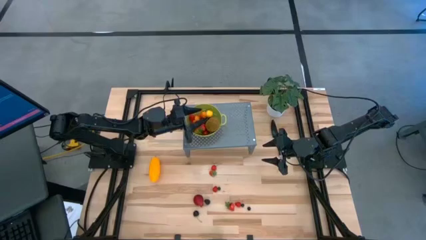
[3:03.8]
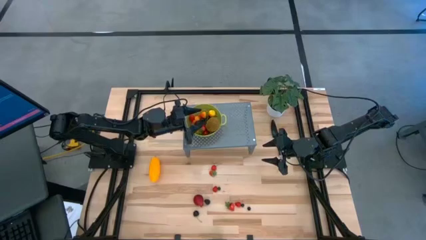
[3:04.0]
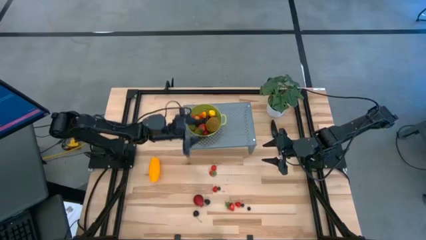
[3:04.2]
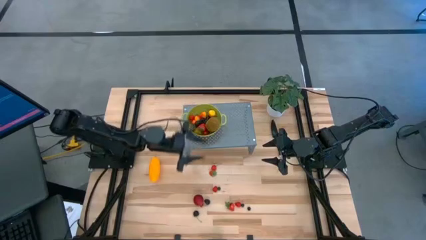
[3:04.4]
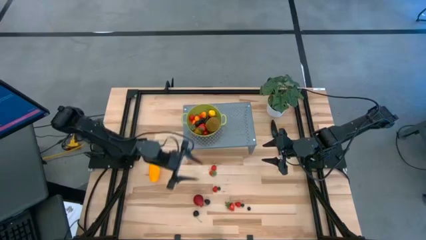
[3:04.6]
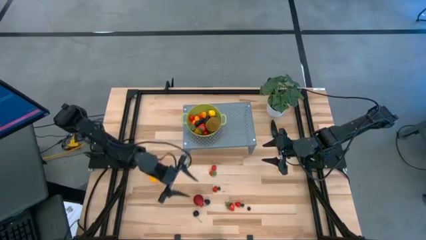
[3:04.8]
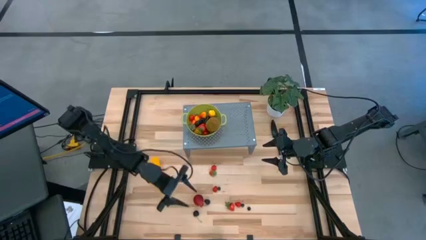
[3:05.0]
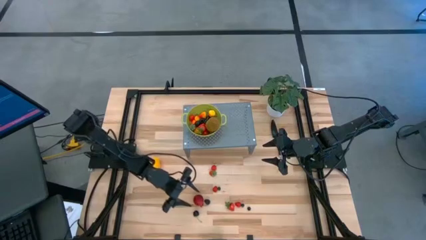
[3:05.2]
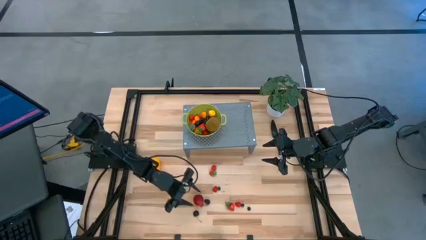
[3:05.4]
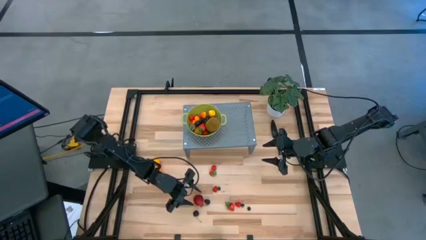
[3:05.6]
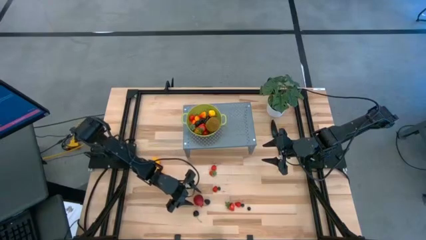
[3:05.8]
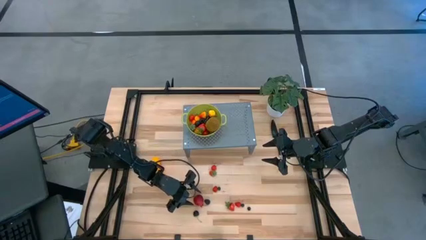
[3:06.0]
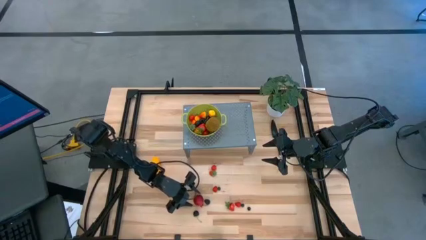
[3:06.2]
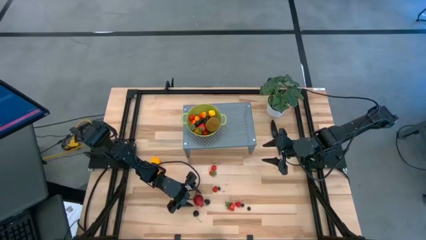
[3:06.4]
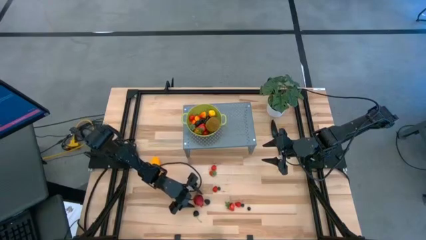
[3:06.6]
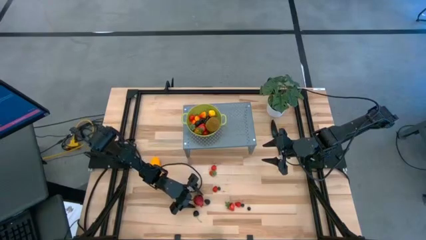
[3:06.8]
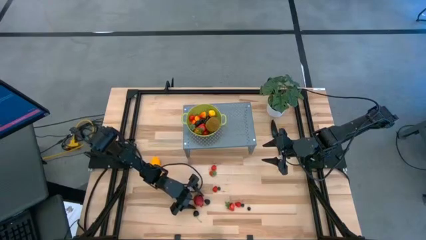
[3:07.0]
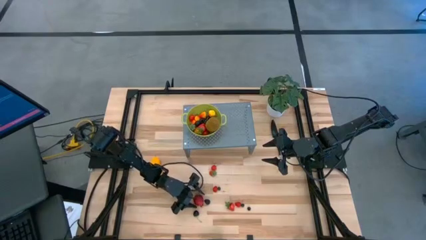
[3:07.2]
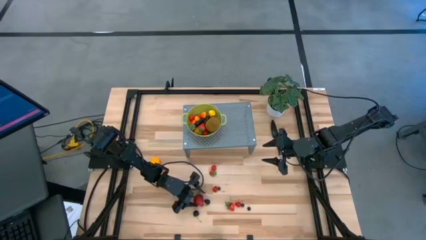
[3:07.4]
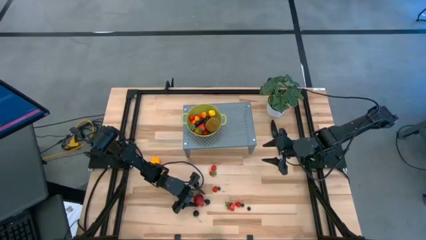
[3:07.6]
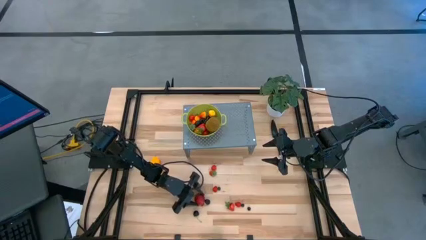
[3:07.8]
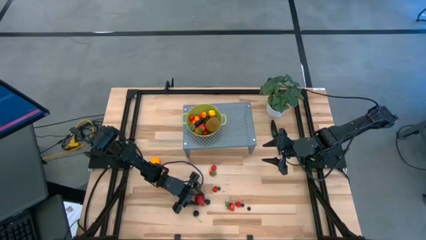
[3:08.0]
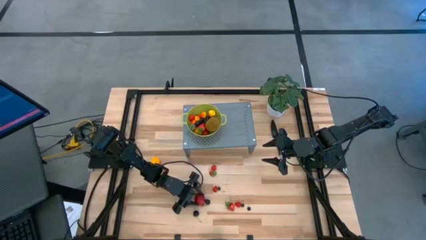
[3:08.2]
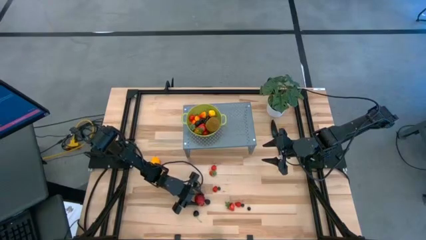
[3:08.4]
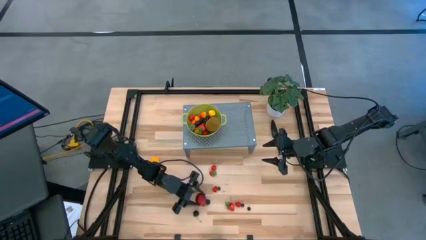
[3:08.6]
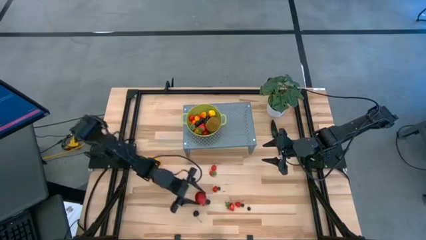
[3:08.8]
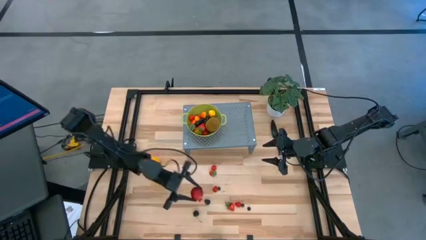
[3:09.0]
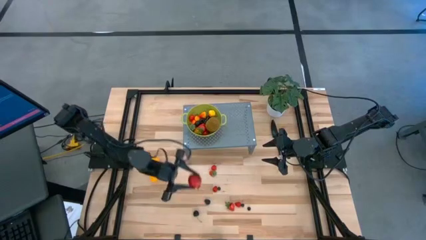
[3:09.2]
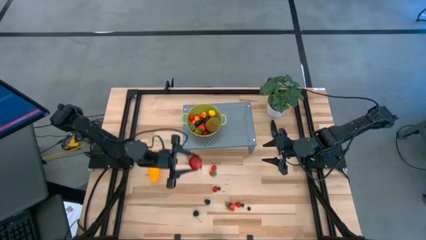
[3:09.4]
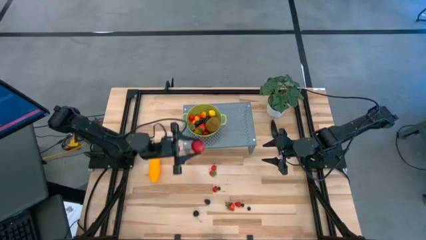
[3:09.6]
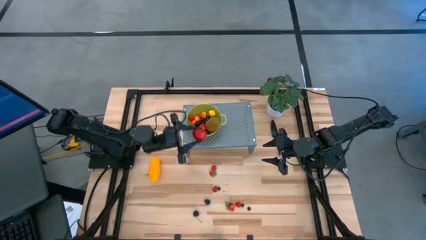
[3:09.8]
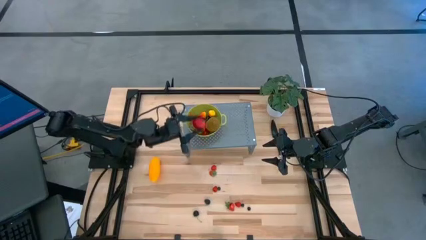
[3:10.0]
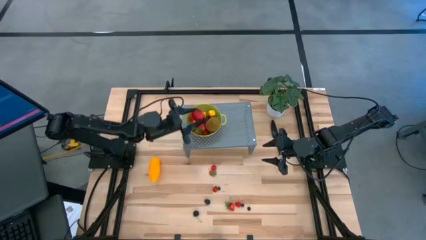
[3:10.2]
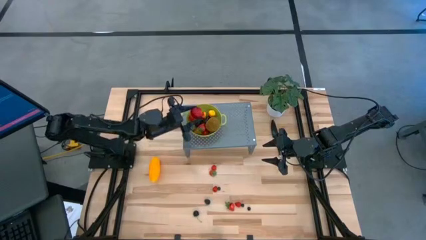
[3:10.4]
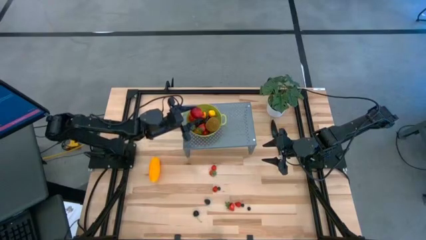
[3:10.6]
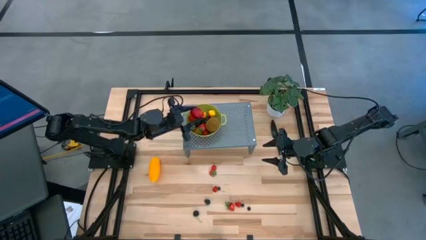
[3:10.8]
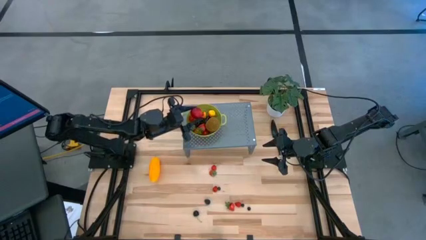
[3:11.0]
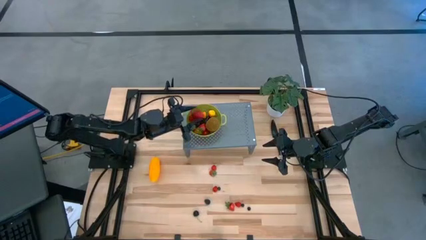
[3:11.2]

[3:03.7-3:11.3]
Task: Pick & Place Fruit
Put the pomegranate into the green strainer bowl on the shelf

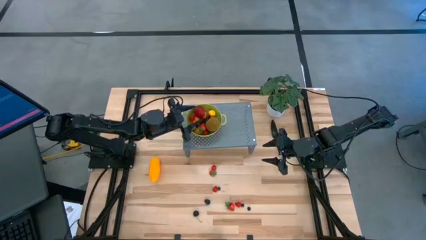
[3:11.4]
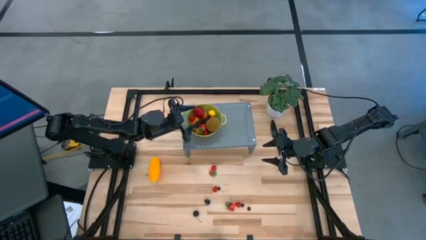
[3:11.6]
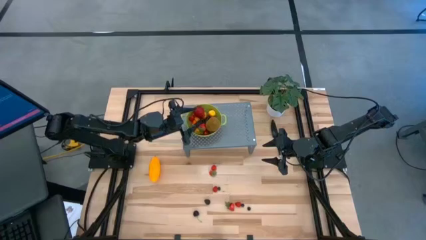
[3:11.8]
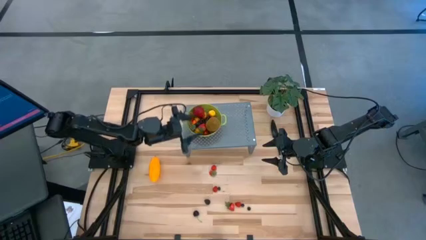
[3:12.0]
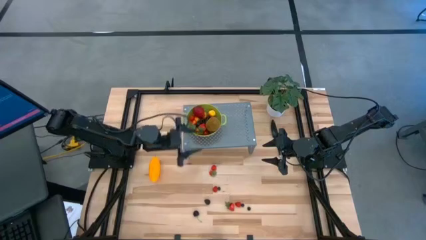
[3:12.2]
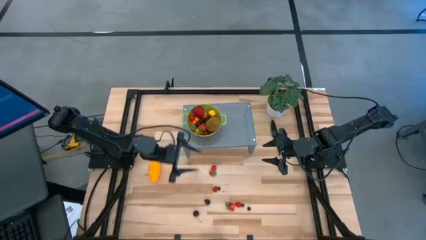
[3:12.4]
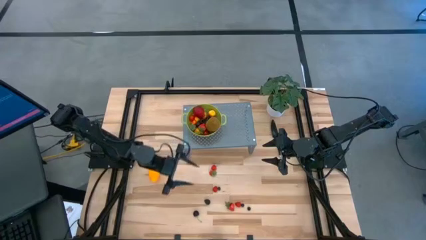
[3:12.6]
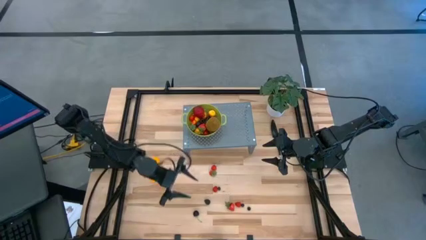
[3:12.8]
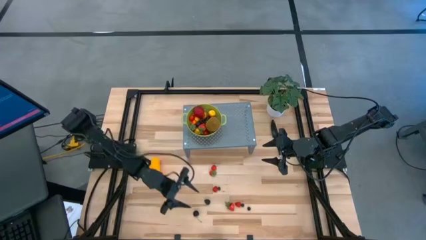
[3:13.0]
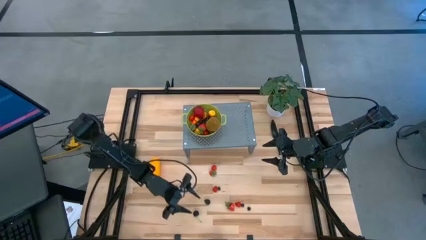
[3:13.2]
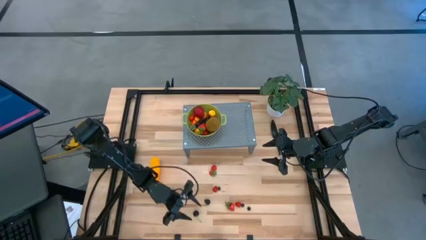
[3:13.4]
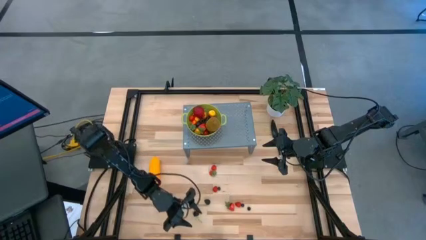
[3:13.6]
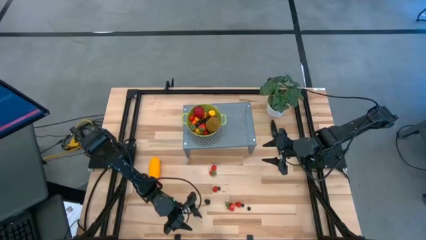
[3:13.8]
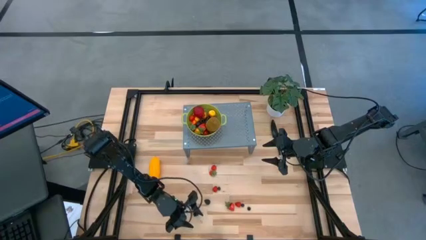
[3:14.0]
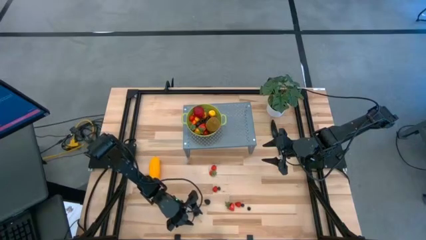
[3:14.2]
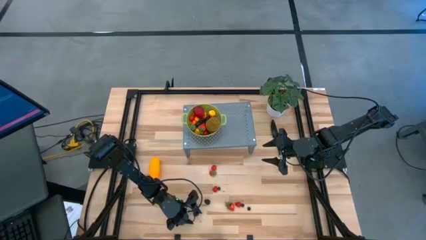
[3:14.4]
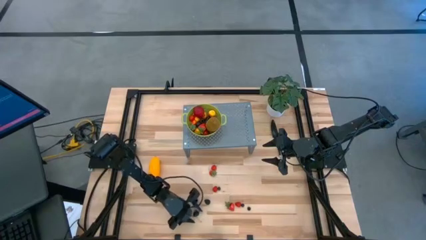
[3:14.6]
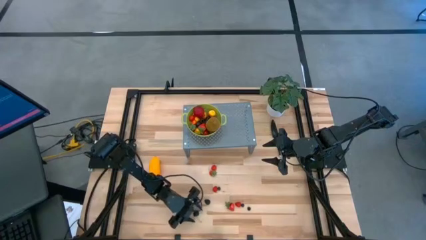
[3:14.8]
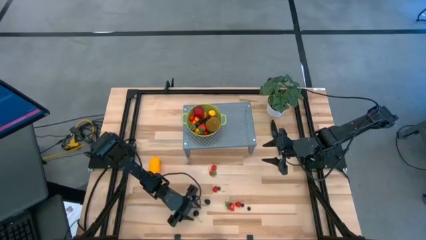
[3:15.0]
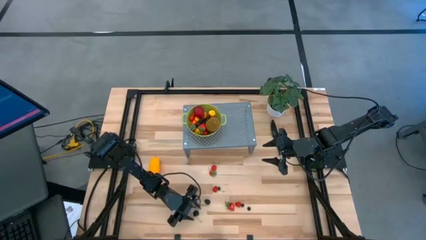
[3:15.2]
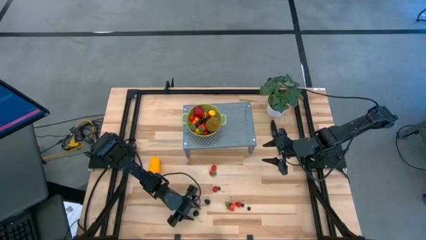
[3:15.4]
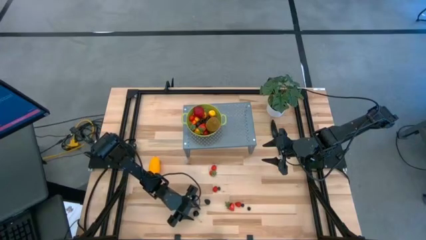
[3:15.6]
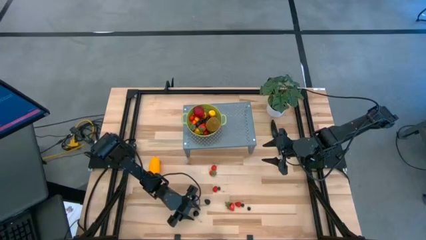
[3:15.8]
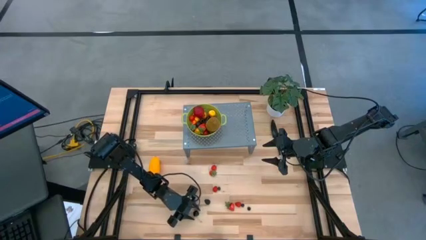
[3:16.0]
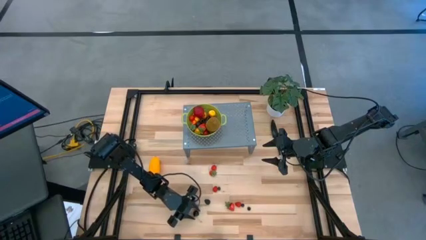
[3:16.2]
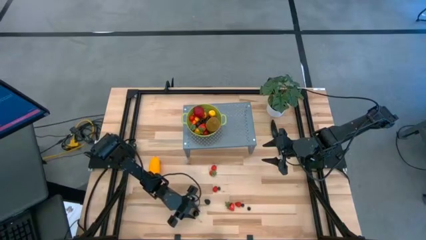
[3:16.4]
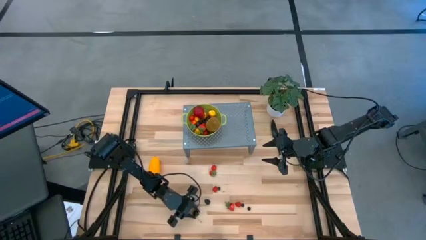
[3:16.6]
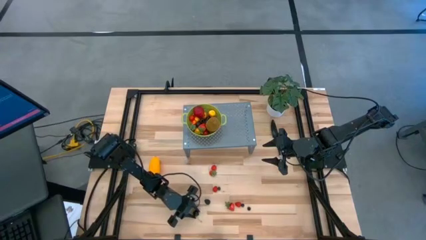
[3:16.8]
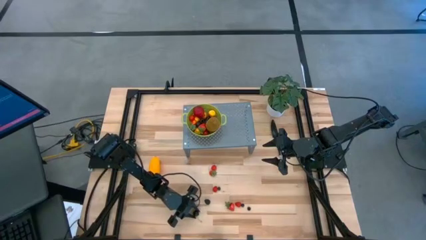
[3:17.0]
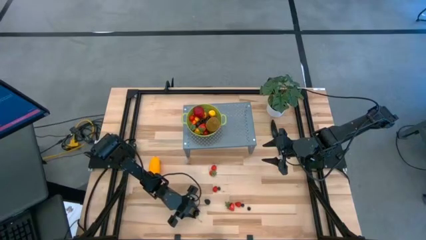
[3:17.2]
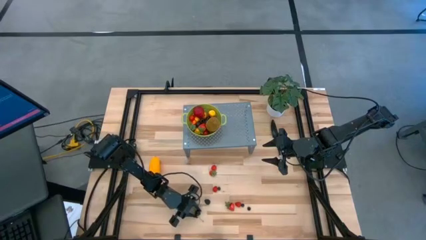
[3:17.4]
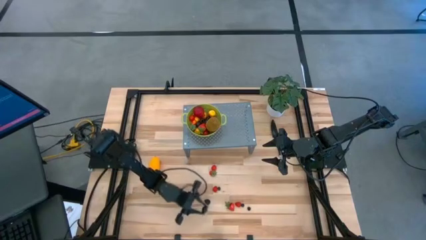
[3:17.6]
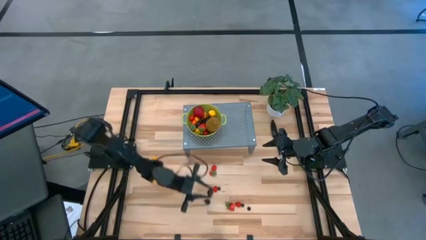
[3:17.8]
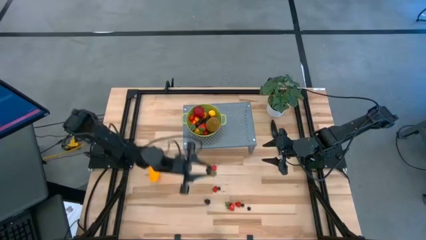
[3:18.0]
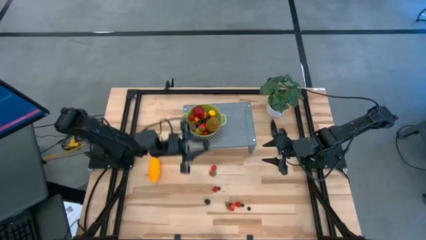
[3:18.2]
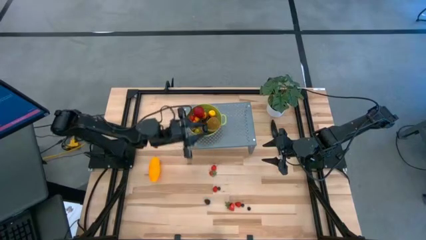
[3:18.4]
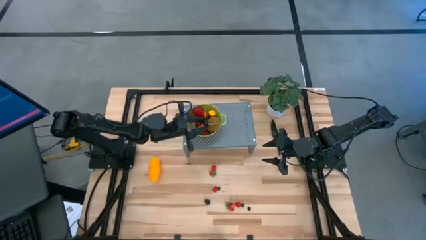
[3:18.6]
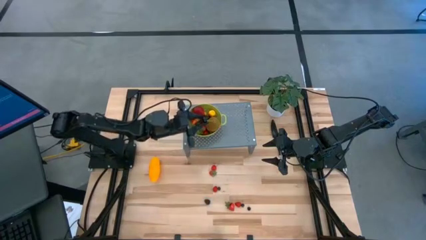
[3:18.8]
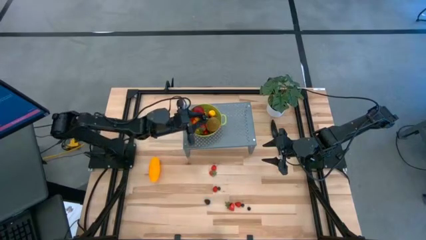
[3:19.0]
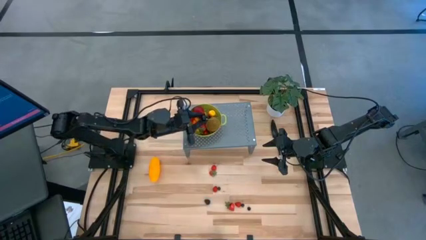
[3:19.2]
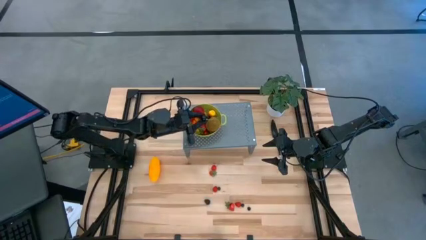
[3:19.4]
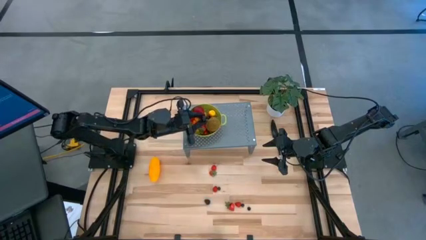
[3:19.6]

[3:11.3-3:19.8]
Put the black cherry into the green strainer bowl on the shelf
